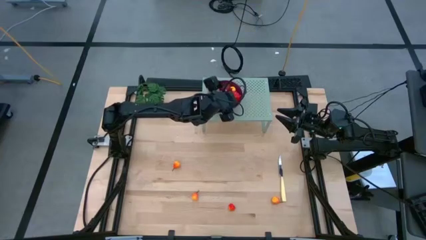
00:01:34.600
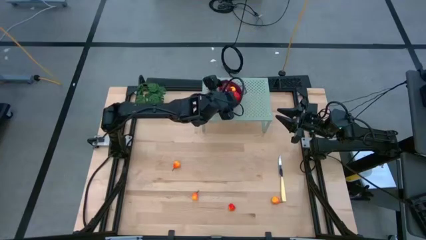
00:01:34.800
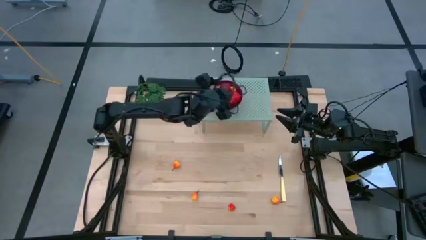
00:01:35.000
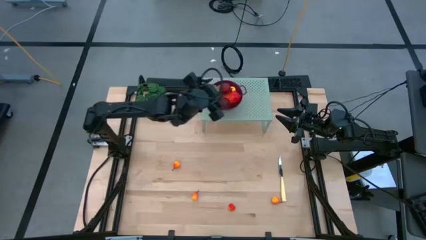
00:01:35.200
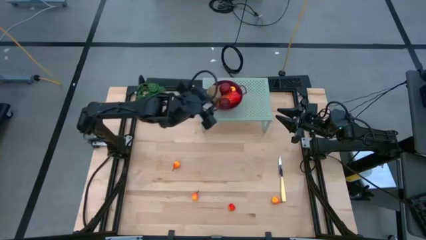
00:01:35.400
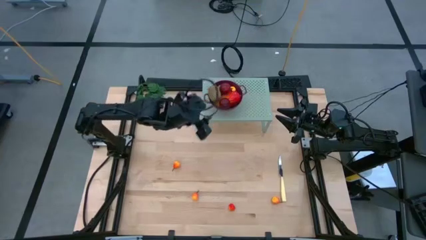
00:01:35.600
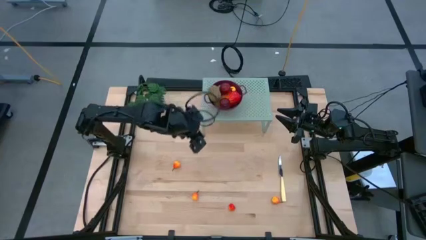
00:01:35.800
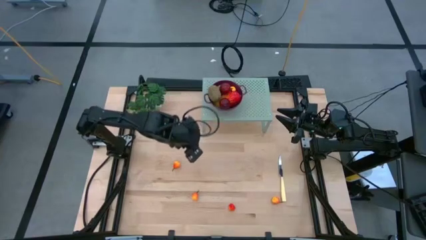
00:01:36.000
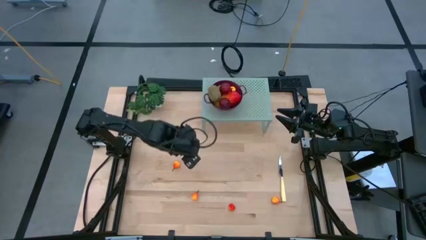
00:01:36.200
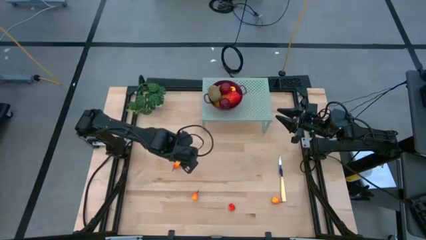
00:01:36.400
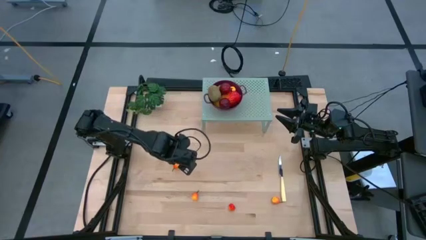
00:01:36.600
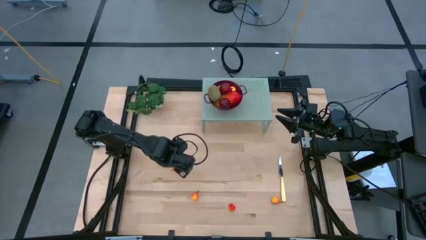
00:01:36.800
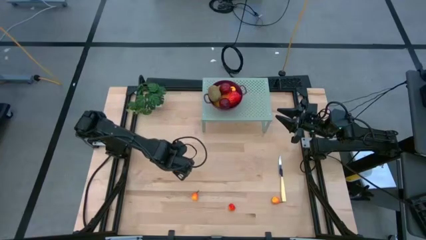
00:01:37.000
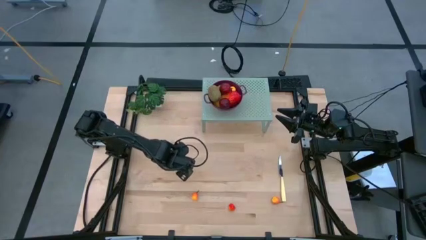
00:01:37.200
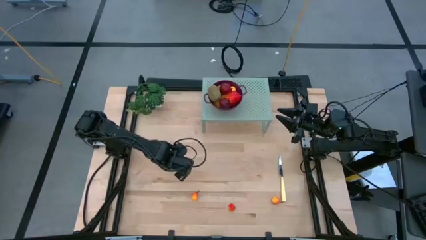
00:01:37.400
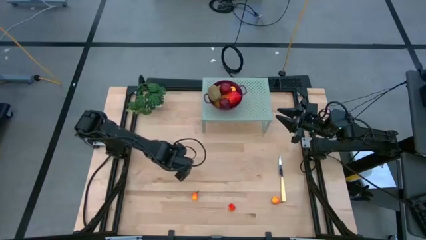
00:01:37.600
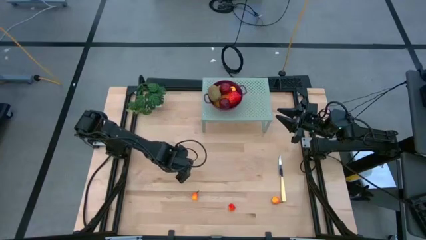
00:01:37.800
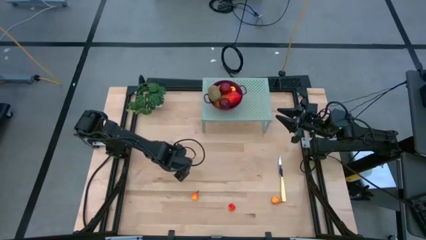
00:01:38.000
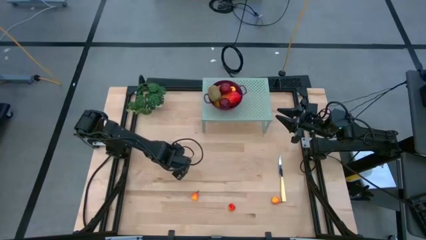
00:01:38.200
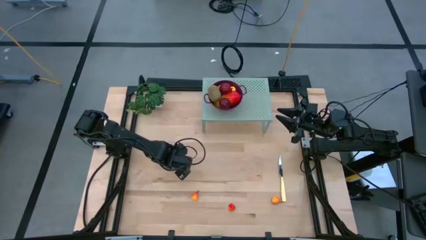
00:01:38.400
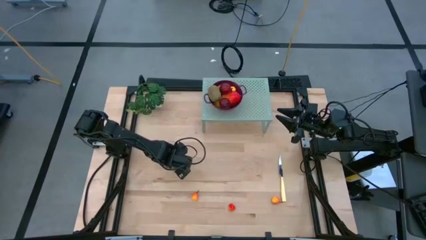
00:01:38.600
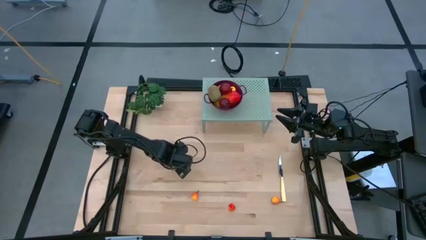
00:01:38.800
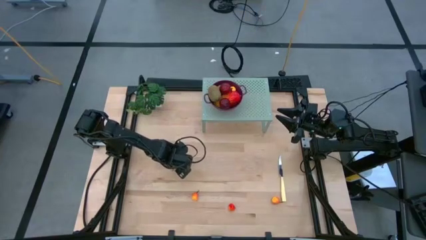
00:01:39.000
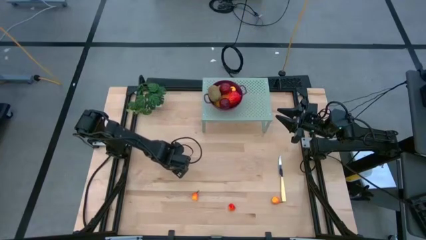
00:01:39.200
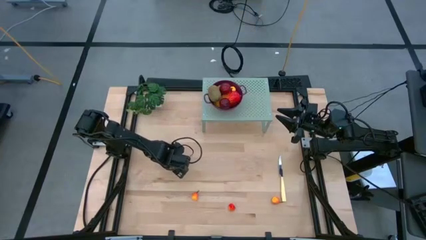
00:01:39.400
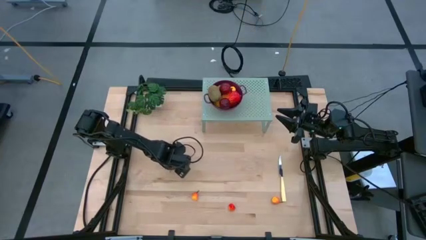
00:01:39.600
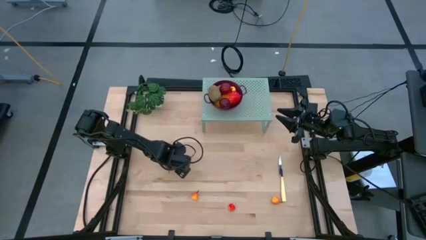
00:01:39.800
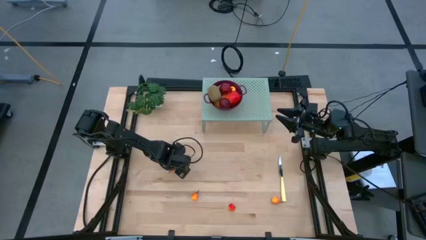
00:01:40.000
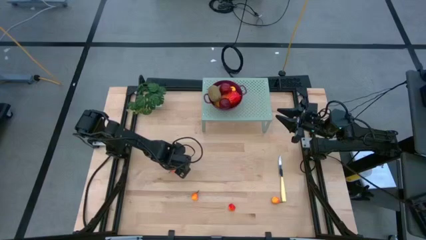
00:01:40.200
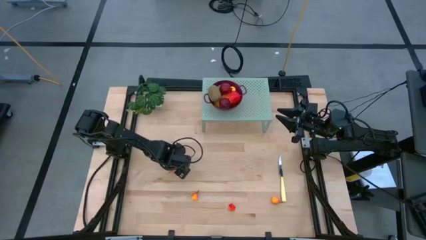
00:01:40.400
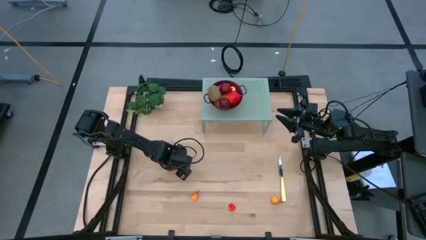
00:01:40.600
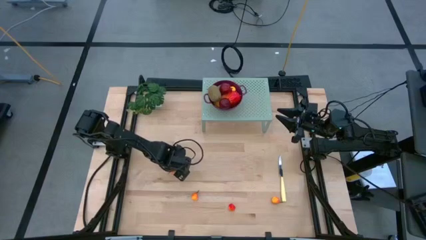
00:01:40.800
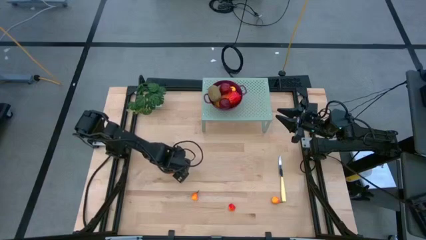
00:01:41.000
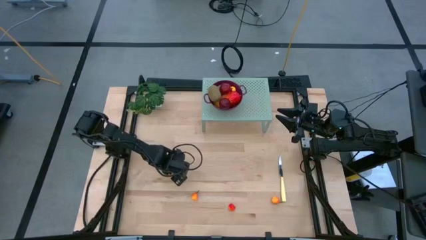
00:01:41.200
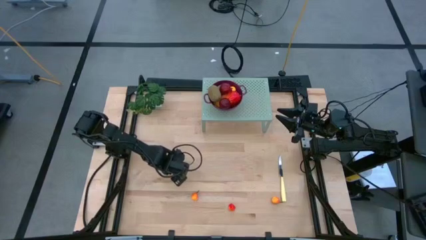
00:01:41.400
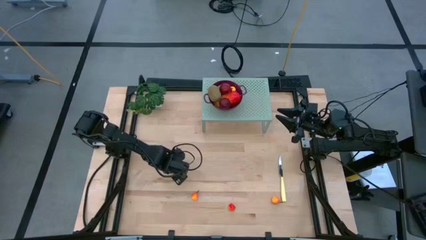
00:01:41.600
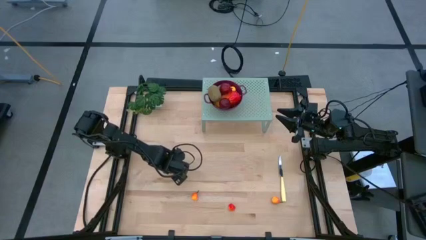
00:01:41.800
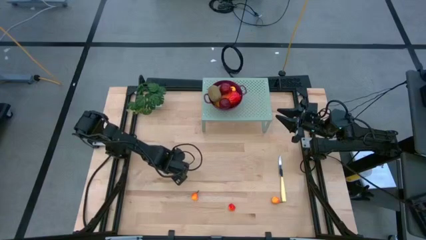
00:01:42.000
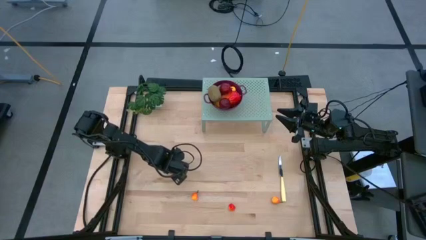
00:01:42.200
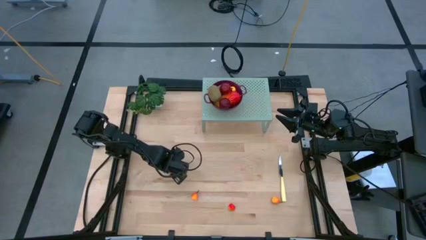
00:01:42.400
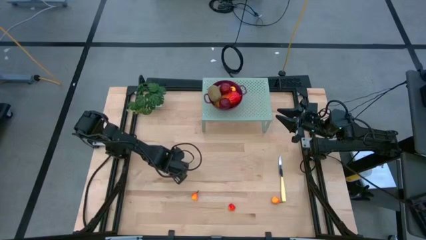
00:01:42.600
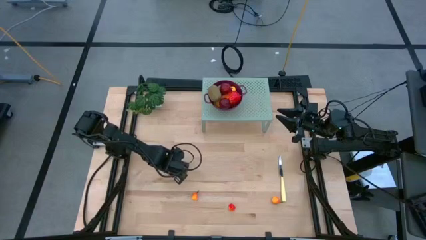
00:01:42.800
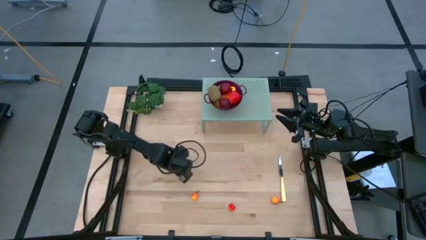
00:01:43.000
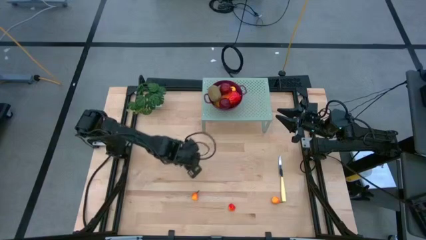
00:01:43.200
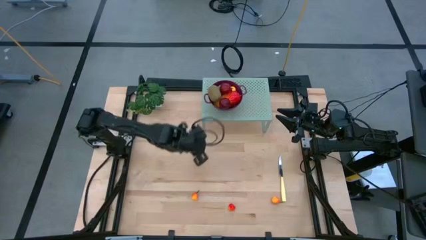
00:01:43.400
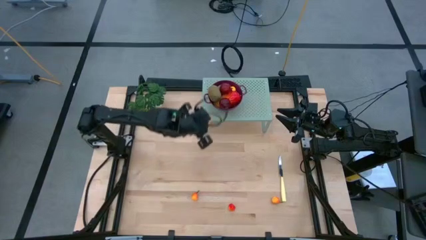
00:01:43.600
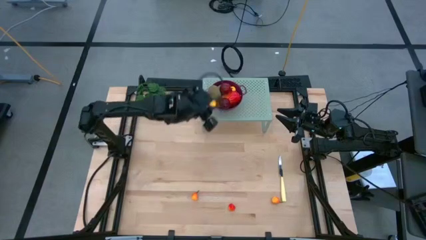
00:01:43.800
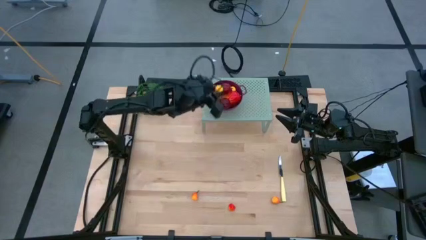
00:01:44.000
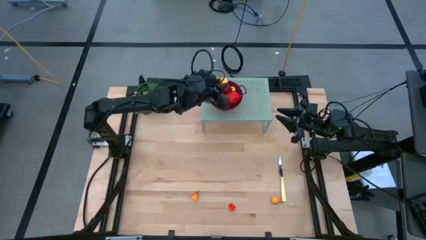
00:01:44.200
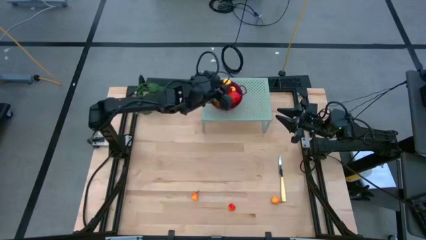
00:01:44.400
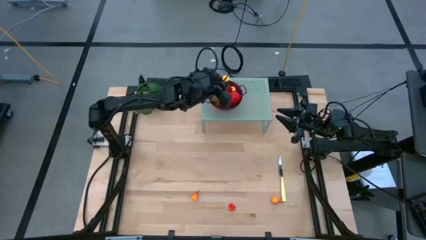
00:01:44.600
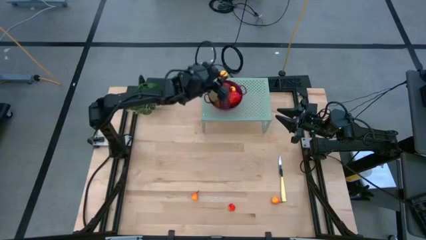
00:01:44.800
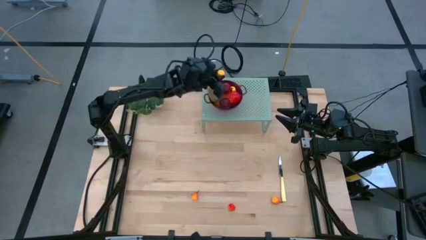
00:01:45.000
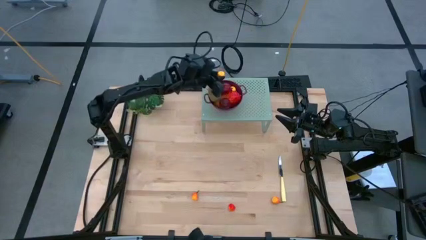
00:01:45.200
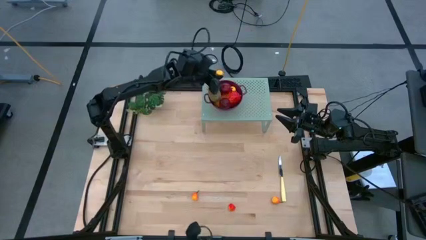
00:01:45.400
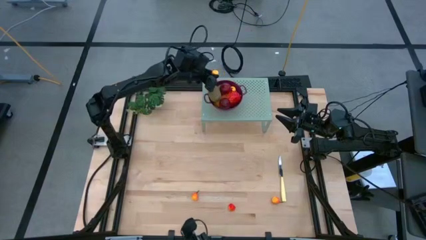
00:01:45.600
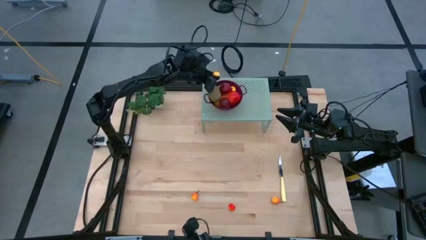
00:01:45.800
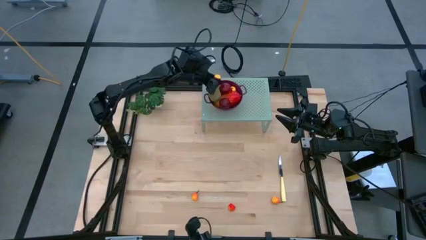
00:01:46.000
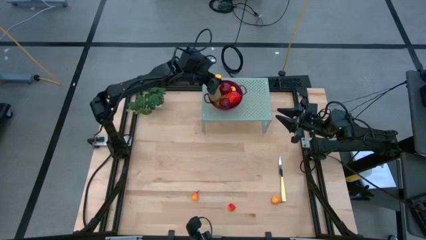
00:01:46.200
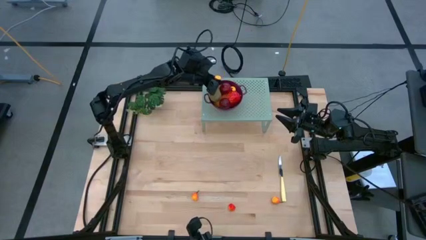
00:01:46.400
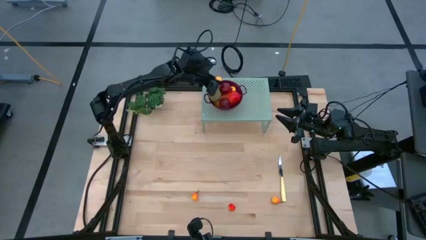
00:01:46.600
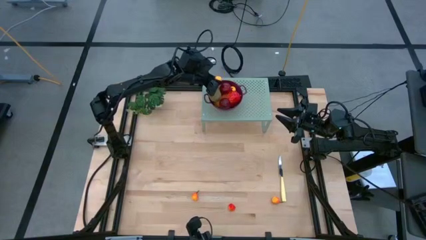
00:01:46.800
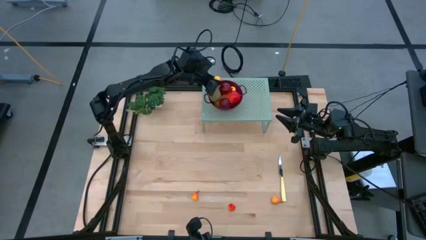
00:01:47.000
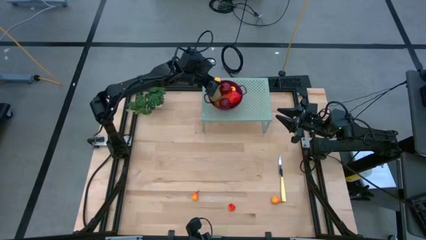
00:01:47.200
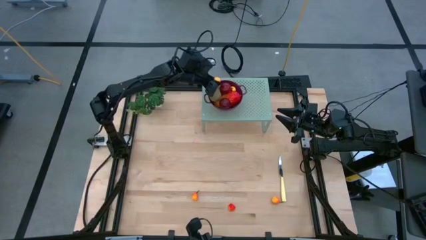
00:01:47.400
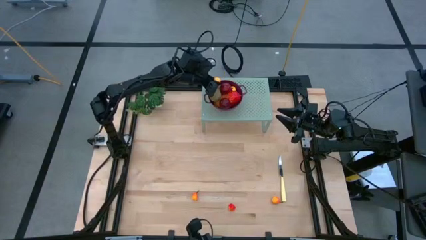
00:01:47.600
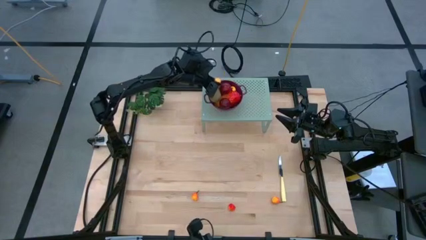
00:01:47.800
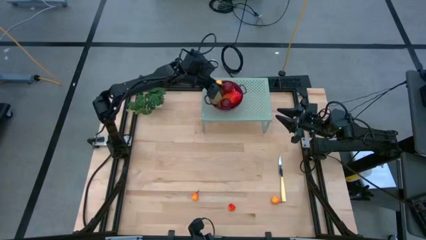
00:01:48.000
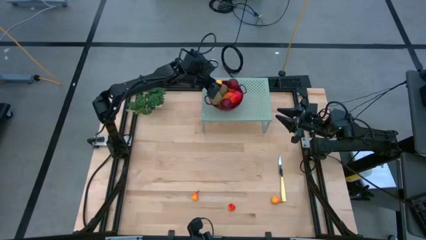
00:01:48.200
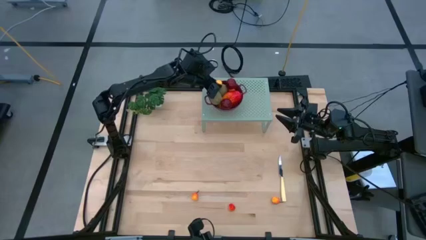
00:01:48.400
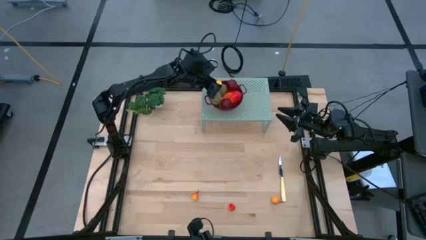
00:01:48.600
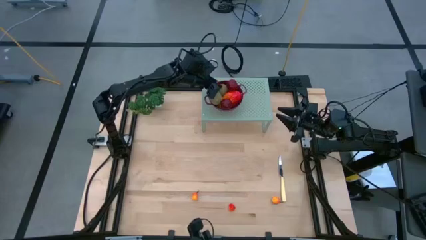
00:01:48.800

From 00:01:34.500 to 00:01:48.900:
Task: Pick & Place Fruit
Put the pear in the violet strainer bowl on the shelf

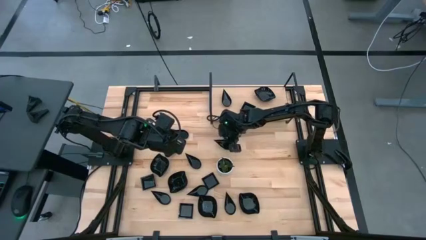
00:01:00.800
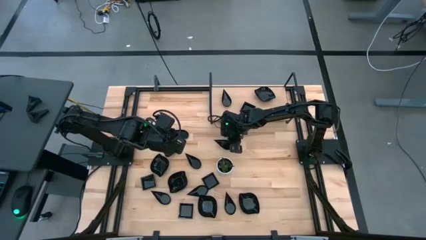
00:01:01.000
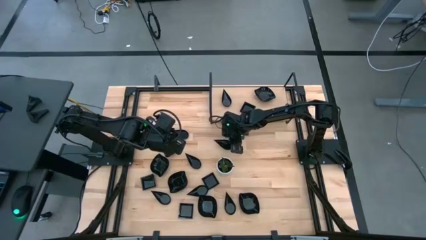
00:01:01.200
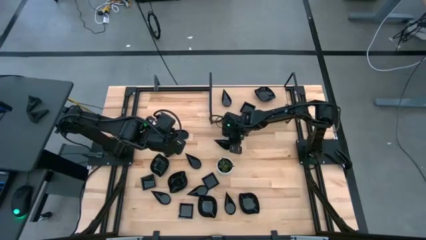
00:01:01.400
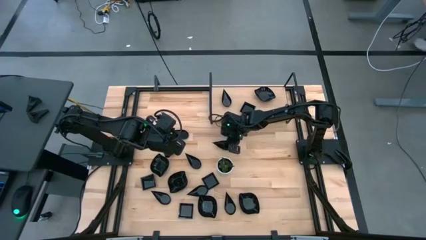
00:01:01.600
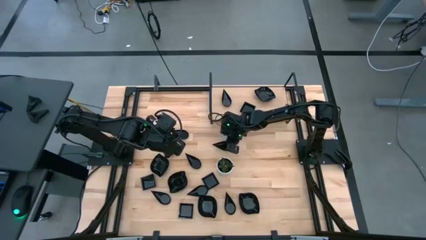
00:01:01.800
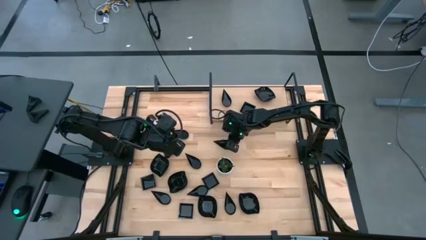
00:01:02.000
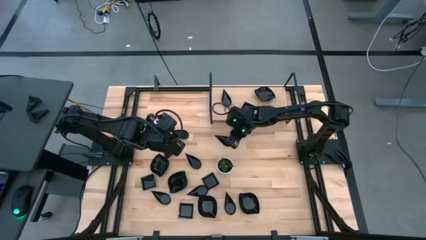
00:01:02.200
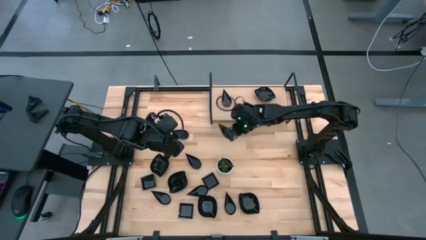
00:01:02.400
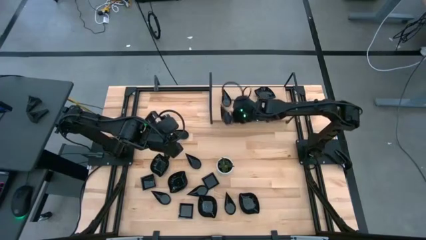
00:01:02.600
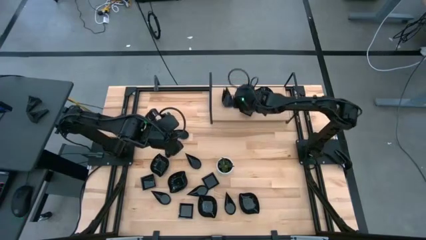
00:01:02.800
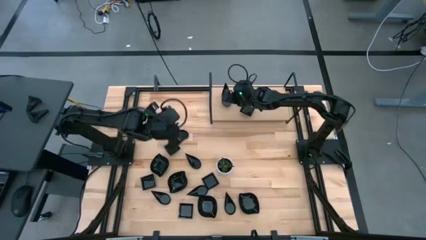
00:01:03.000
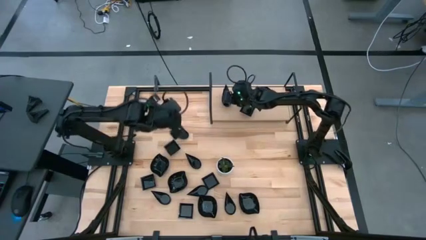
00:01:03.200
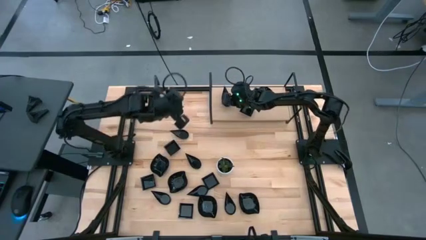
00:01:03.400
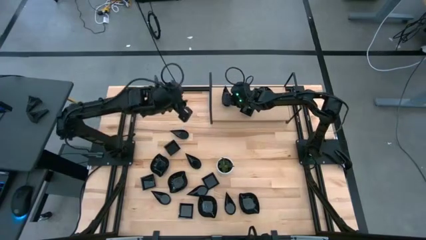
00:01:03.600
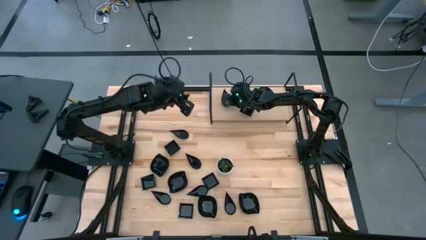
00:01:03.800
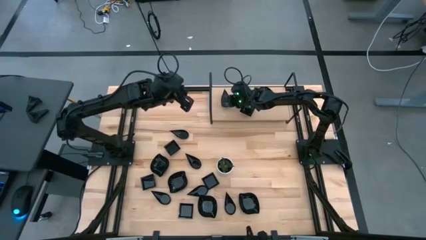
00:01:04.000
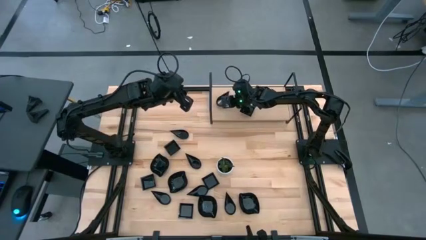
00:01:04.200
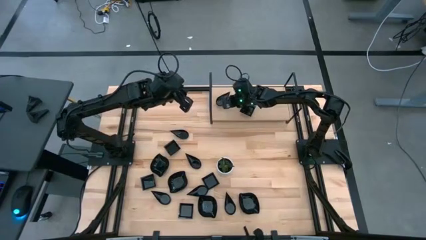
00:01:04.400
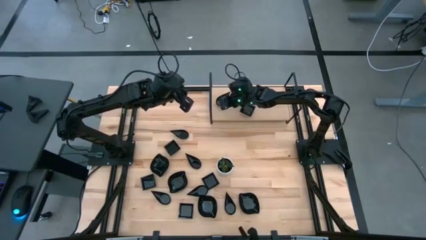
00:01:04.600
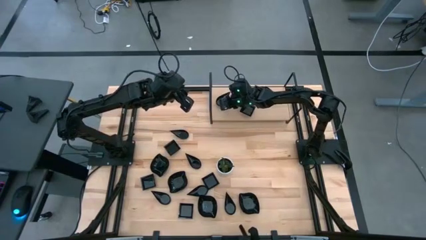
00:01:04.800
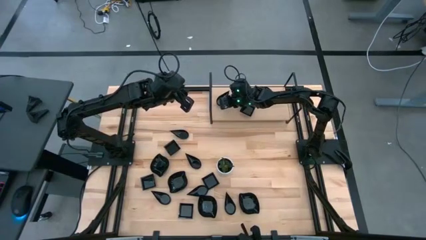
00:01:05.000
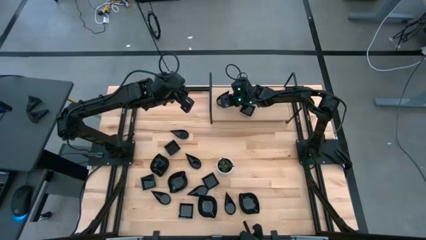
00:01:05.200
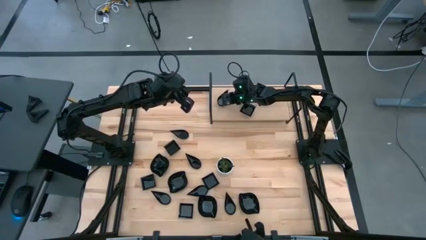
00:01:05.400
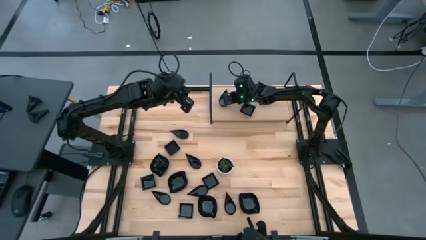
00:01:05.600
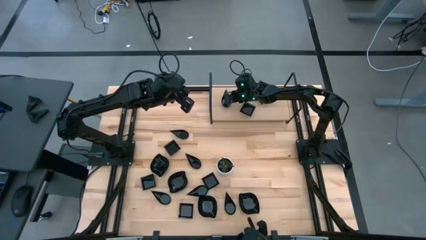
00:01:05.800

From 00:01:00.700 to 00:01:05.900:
Task: Pick & Place Mini shaped plates
Stack the drop shaped plate on top of the drop shaped plate on the shelf
